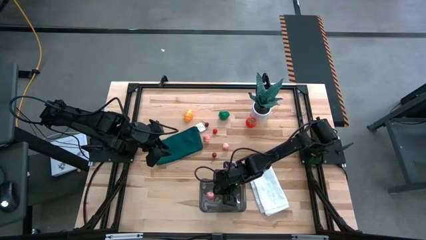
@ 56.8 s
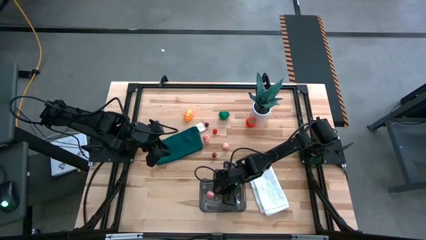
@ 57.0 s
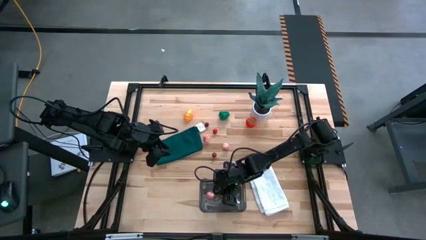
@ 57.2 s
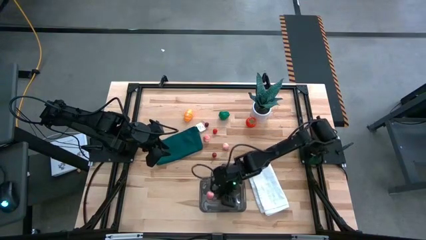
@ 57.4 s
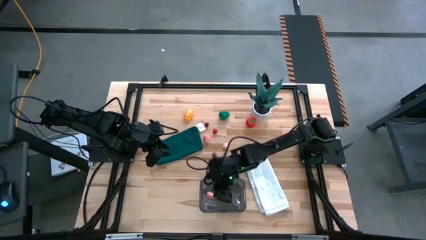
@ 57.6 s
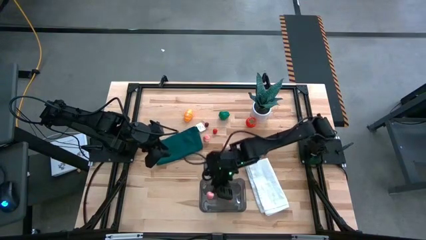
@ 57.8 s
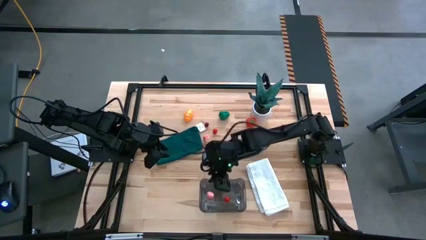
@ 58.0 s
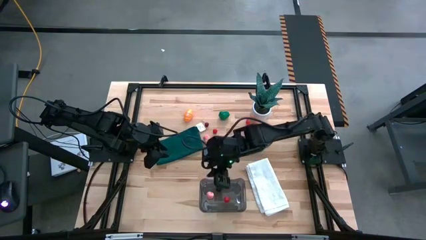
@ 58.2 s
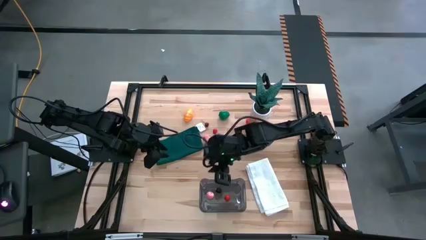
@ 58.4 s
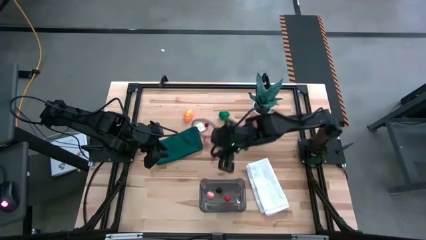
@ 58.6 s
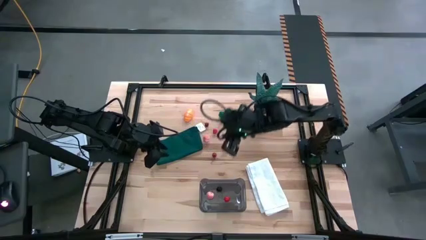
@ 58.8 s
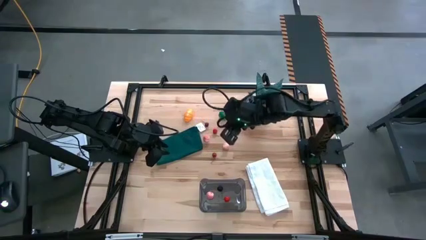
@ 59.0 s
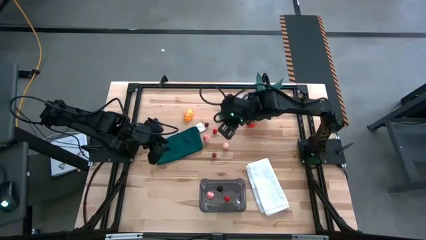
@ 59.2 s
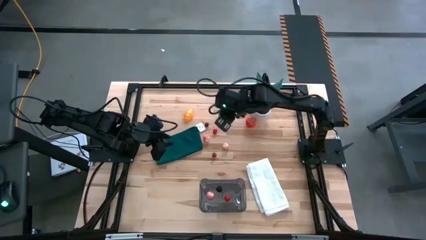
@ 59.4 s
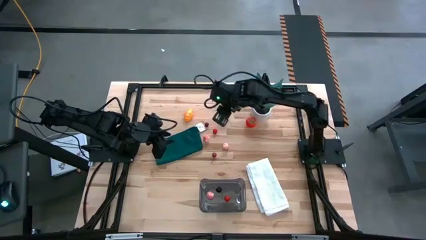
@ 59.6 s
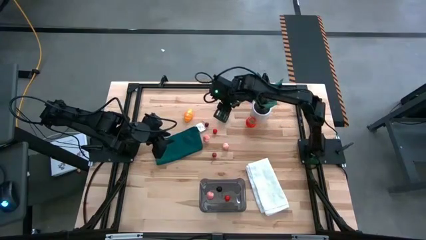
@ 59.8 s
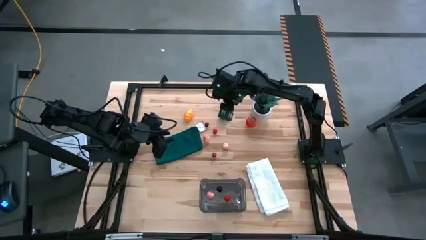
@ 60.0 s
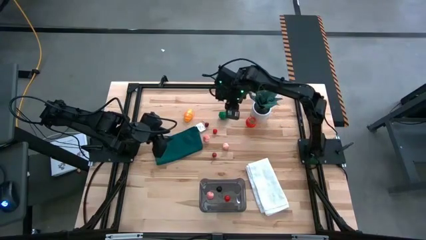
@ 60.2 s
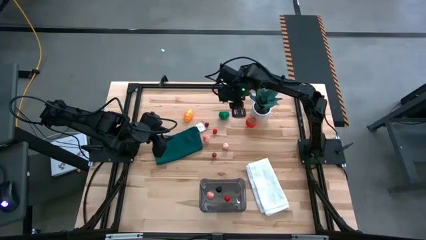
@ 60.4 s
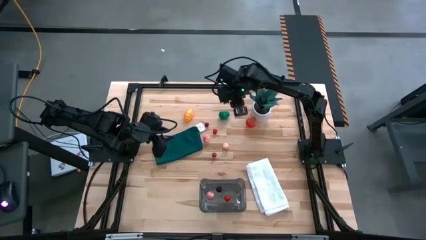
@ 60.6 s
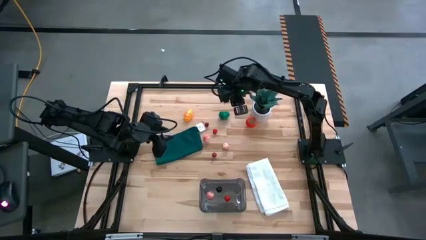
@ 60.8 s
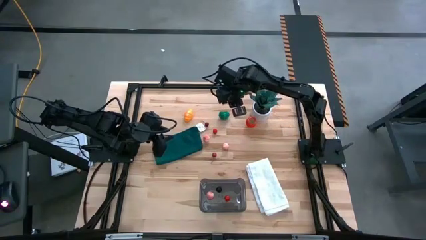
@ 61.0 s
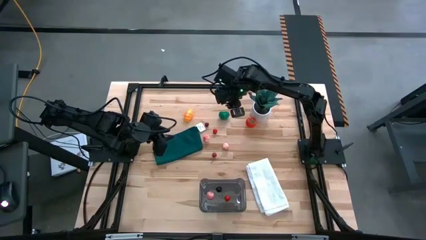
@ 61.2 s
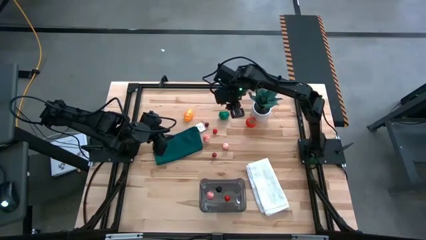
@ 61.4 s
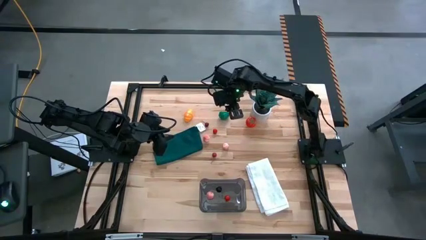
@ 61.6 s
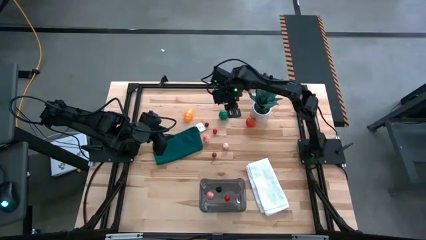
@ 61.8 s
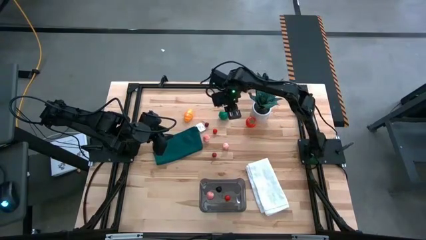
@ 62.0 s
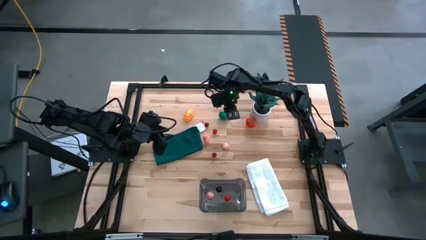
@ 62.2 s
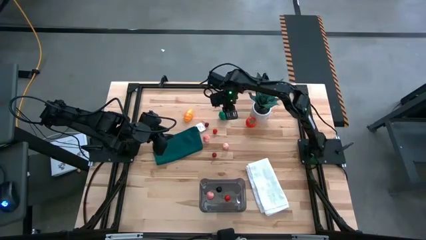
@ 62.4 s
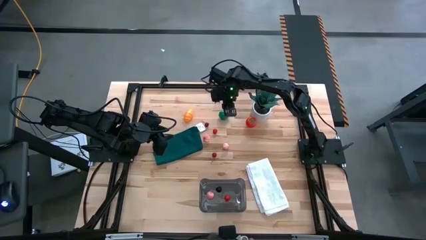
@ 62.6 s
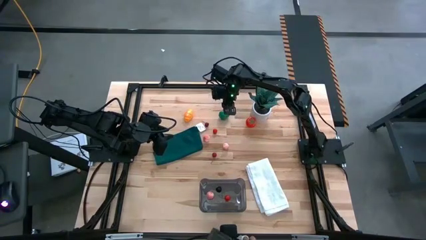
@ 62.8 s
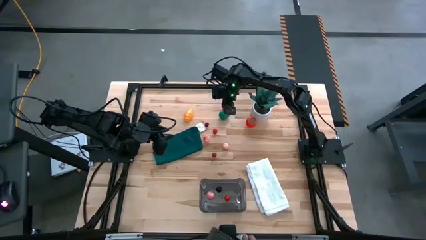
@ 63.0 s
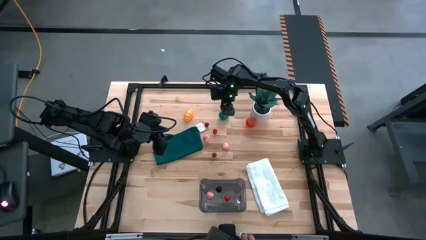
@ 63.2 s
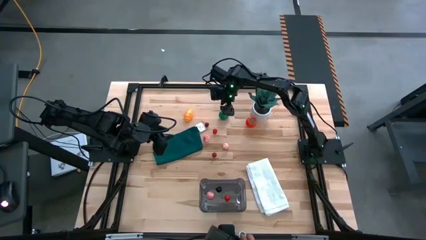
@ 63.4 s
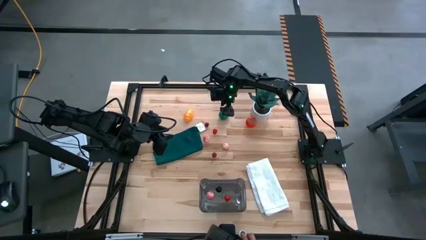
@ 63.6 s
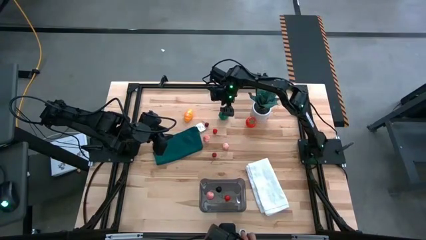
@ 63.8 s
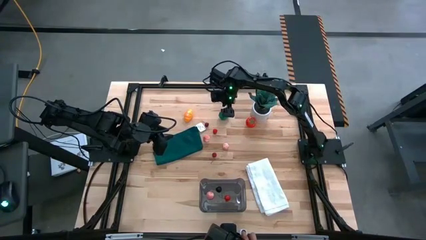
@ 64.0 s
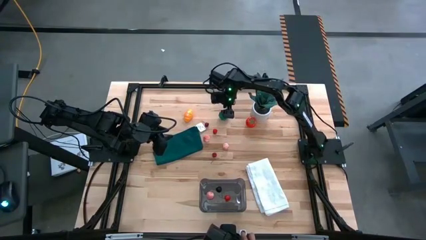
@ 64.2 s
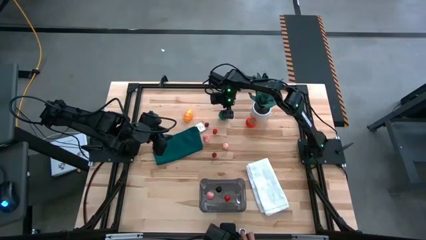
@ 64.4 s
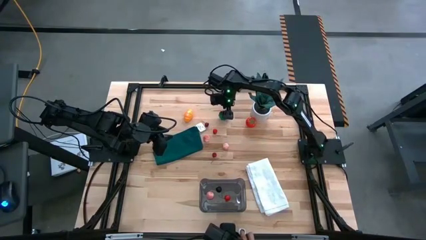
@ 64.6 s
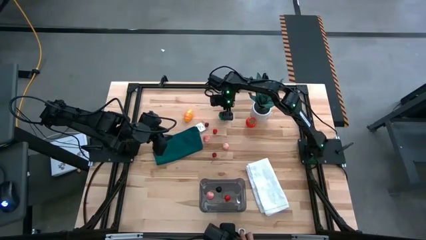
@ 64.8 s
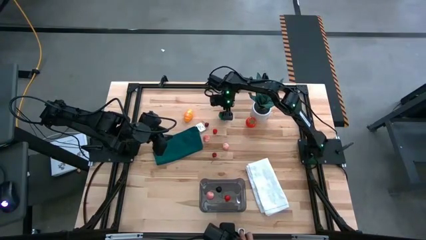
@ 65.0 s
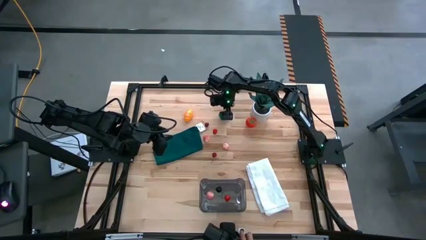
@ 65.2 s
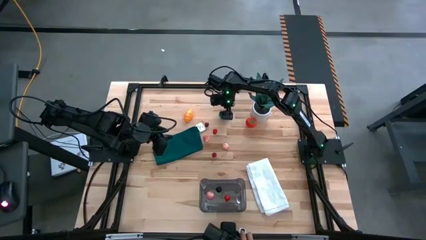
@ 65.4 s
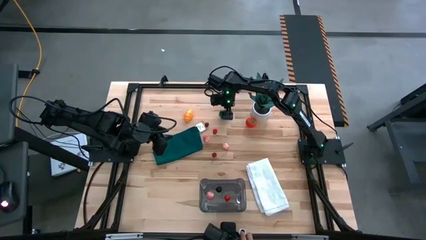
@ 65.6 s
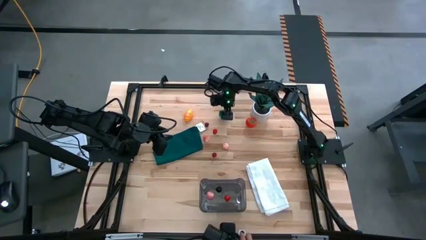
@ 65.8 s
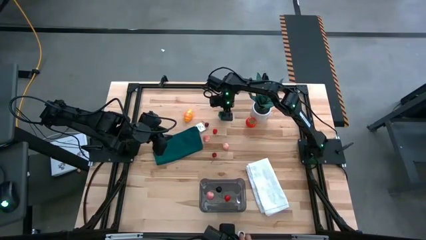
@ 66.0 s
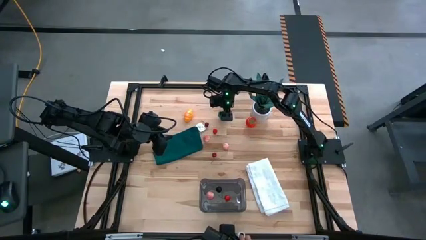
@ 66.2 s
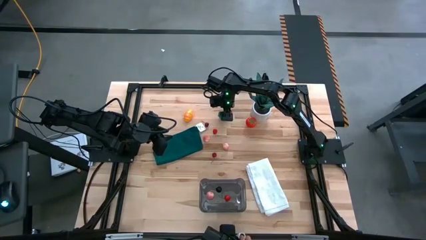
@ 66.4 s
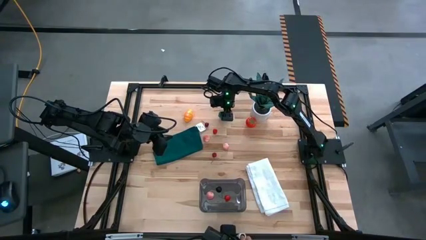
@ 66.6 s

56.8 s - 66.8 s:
Task: Pick and placing Produce into tupperware
Put the green bell pepper into the black bin

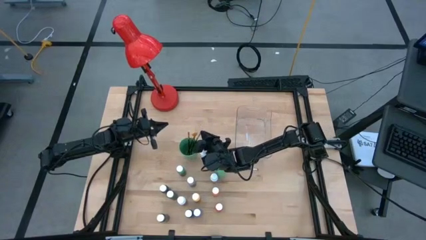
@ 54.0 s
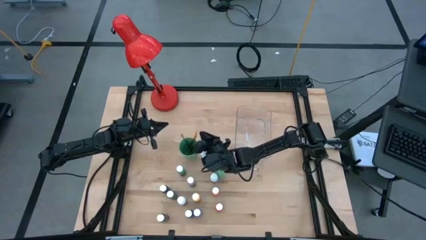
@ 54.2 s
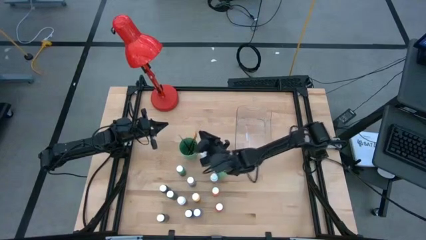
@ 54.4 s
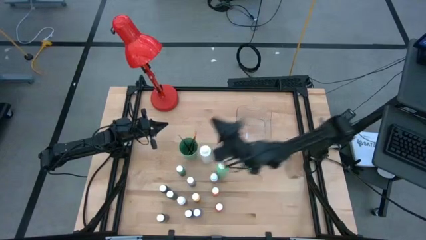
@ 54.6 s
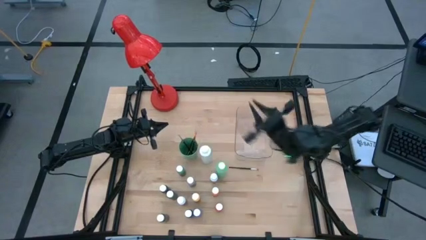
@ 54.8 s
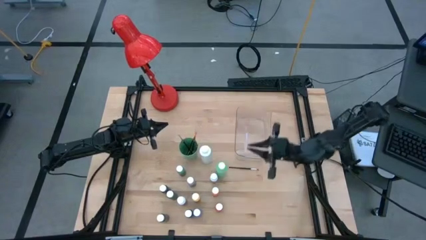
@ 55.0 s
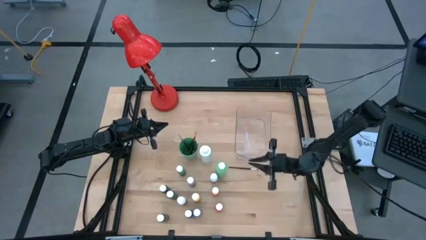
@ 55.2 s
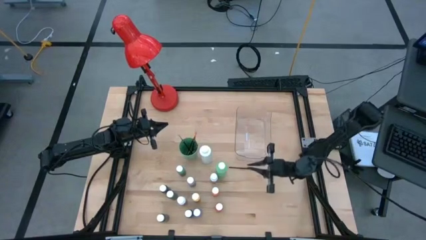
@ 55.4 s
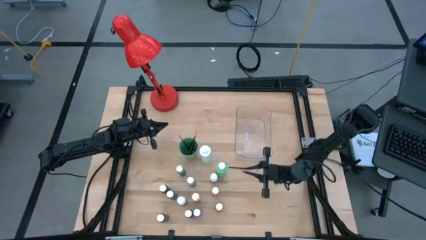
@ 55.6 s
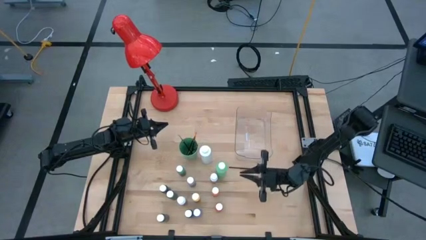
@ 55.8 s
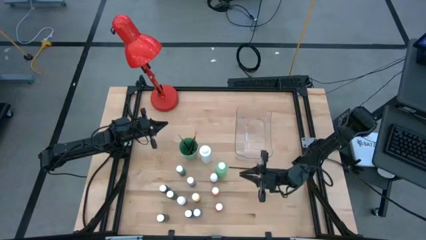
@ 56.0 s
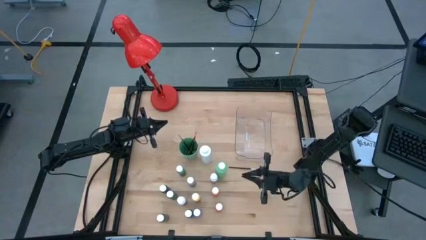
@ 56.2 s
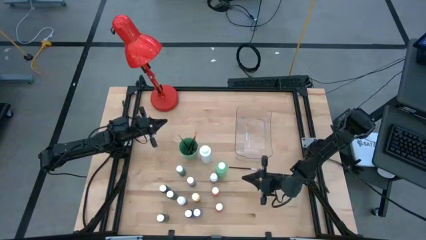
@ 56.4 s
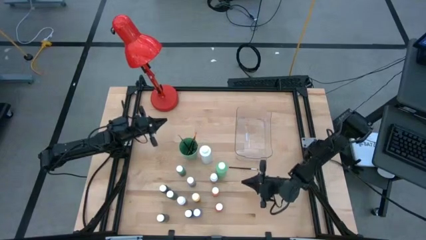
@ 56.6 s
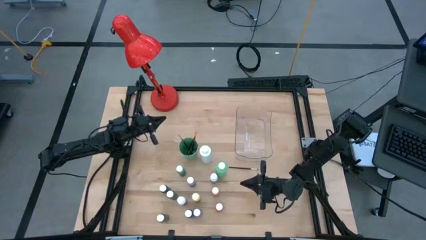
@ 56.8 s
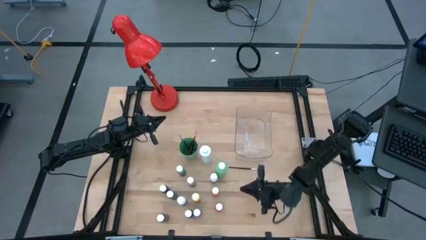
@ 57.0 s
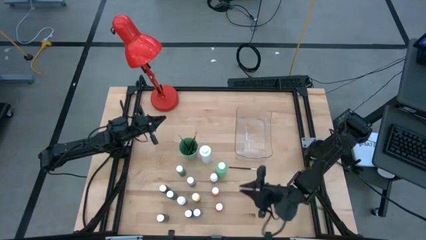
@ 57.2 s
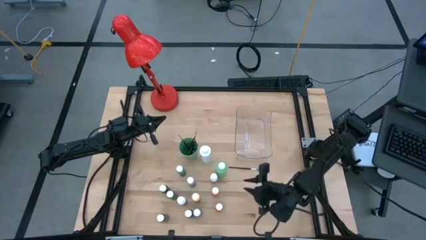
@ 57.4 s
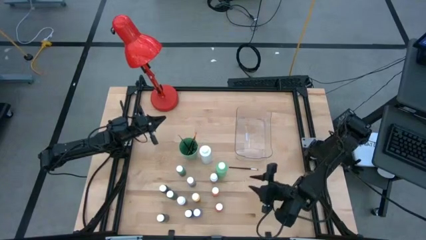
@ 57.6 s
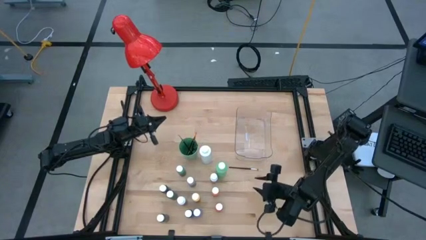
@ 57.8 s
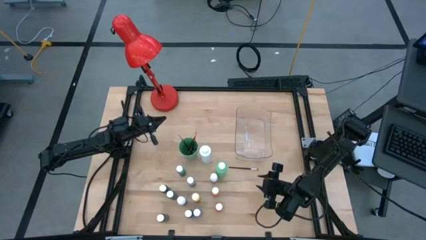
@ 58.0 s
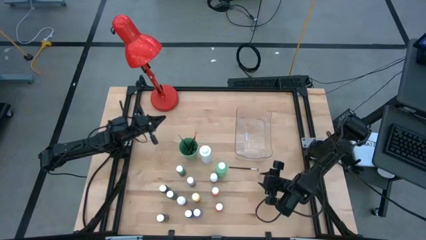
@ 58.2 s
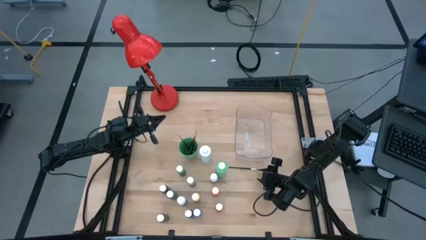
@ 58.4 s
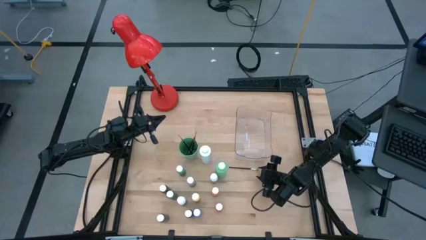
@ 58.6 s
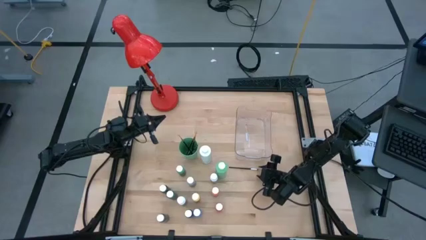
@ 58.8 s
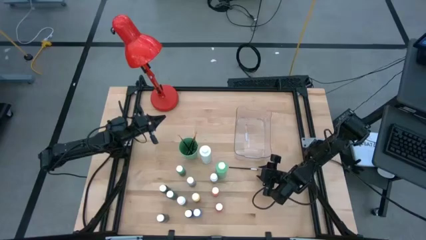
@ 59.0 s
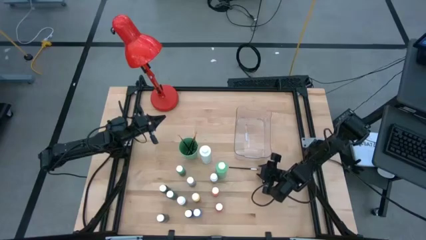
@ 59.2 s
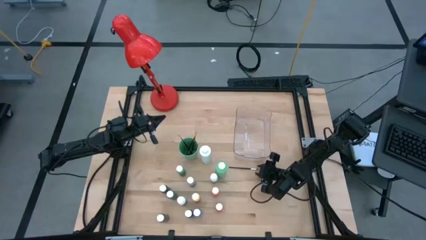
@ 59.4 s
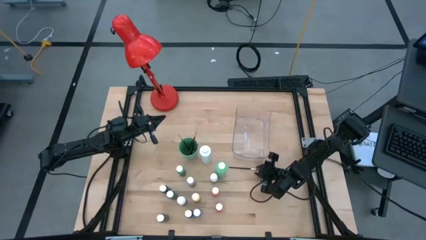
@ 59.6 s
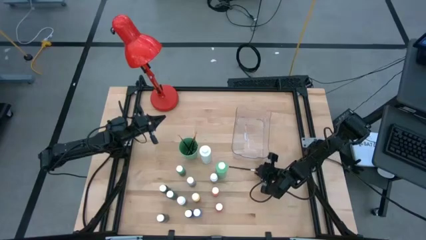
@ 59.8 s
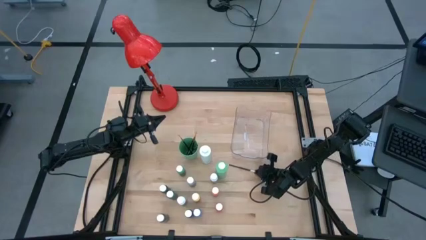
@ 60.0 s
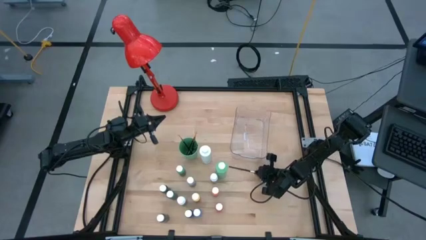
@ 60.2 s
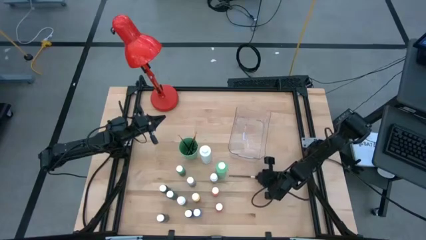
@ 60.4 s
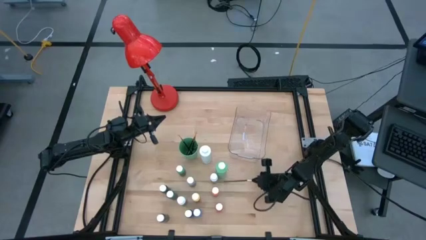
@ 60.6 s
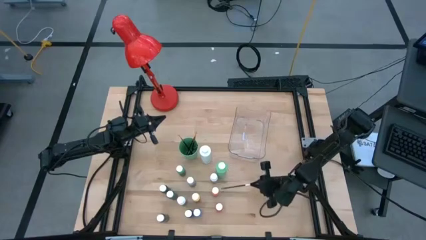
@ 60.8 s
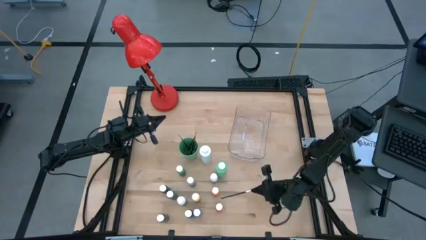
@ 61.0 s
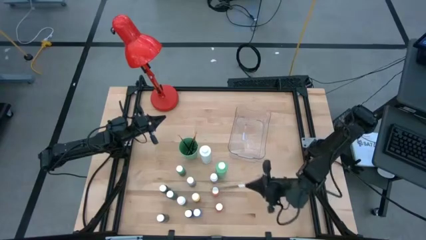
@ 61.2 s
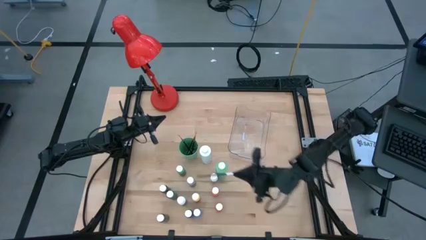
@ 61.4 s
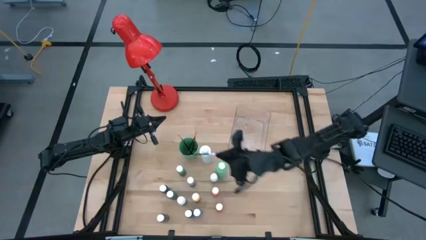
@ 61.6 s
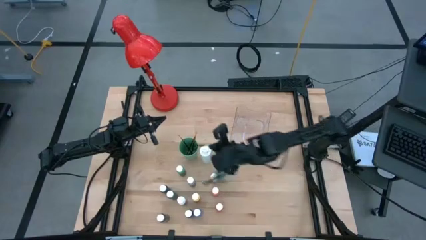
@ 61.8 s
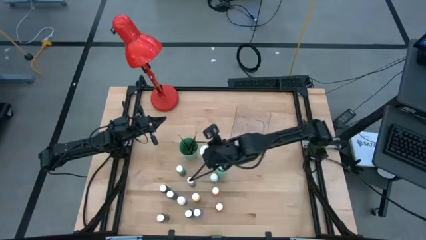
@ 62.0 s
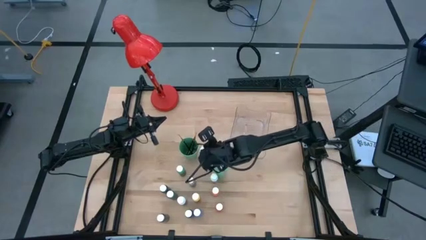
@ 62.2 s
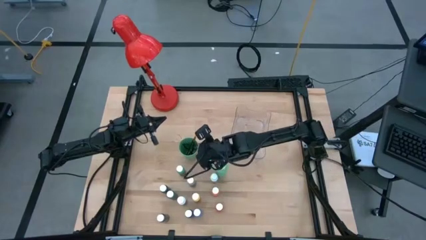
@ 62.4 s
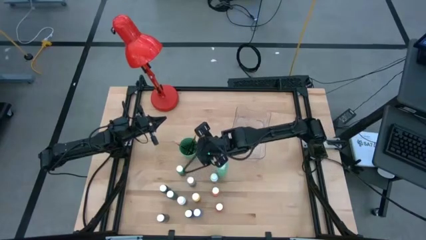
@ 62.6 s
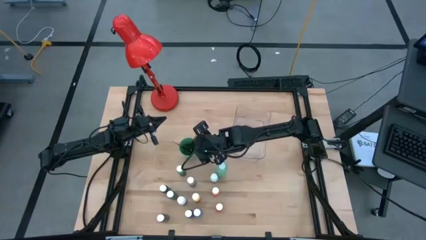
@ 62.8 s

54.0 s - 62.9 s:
Task: Pick & Place Paint Supplies
Put the silver paintbrush into the green cup
